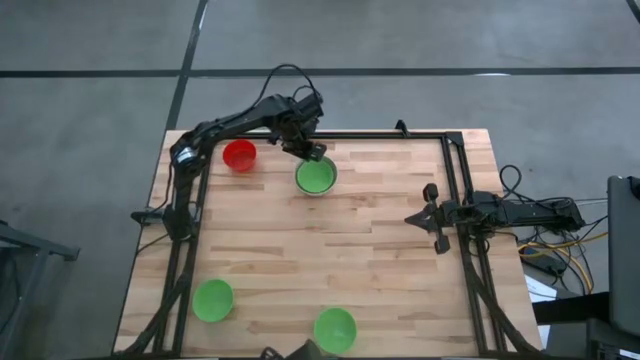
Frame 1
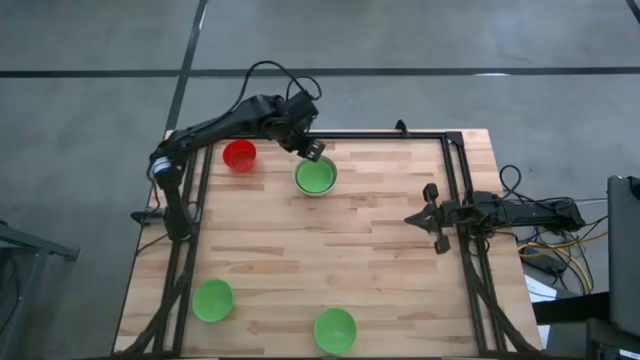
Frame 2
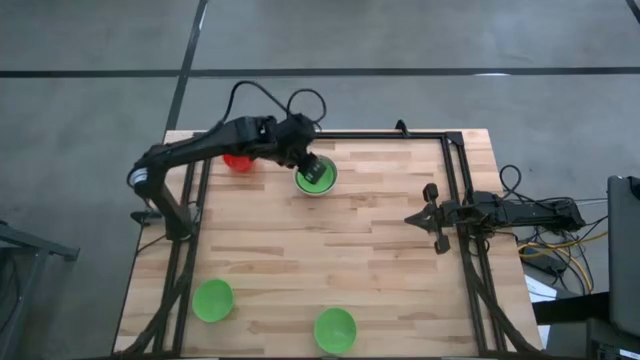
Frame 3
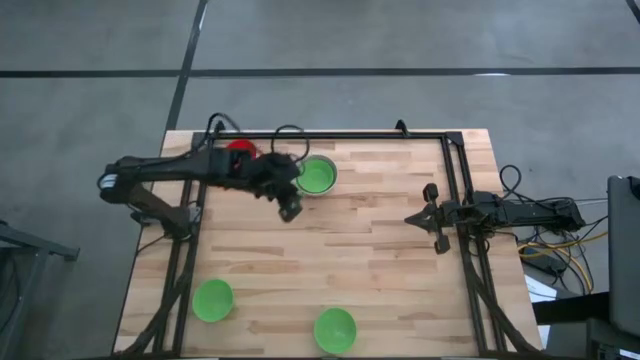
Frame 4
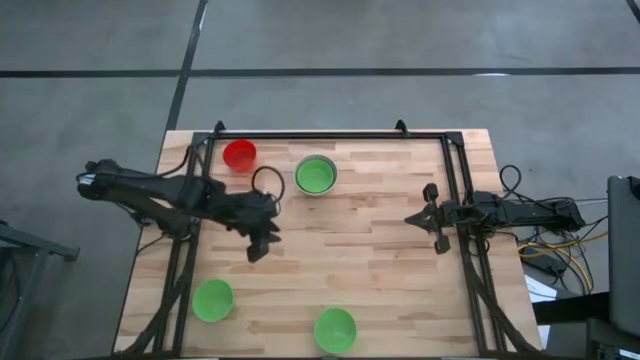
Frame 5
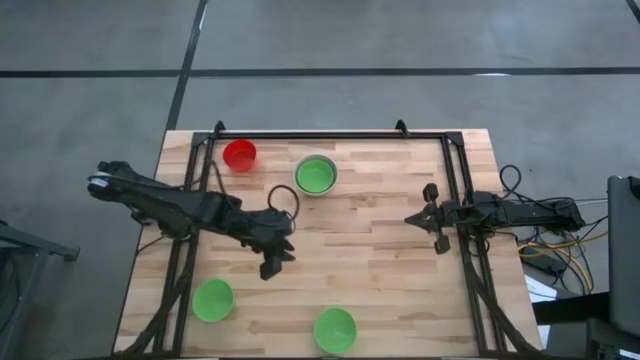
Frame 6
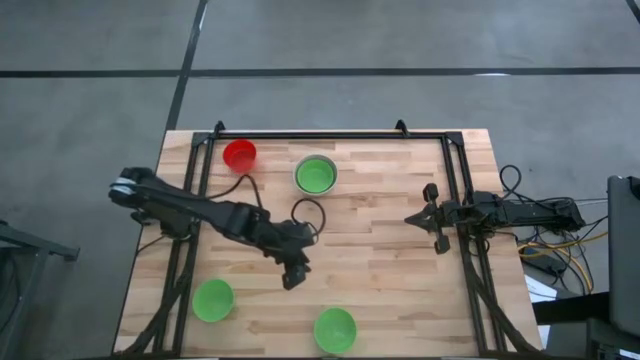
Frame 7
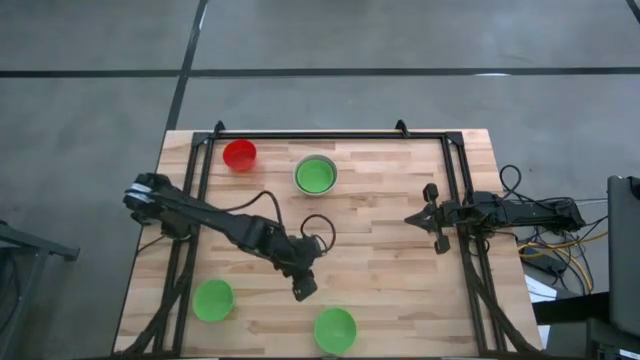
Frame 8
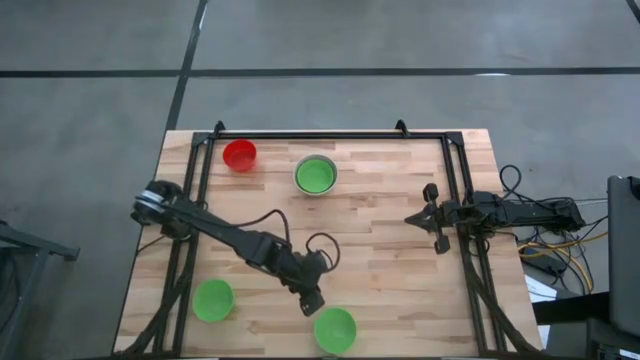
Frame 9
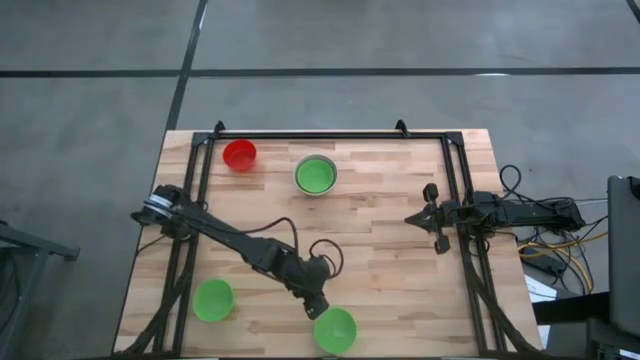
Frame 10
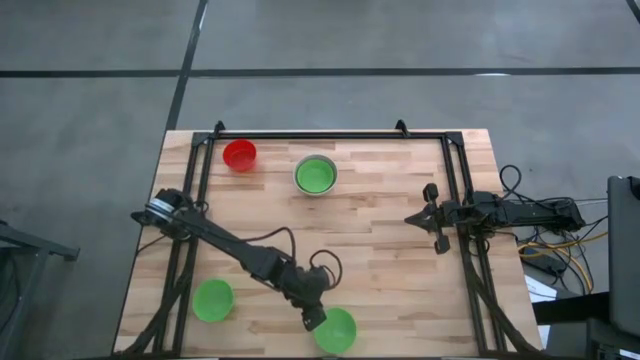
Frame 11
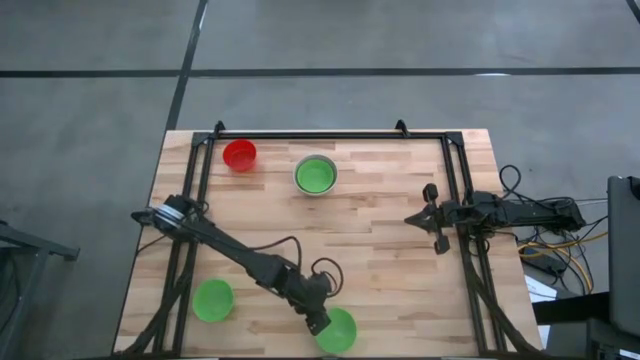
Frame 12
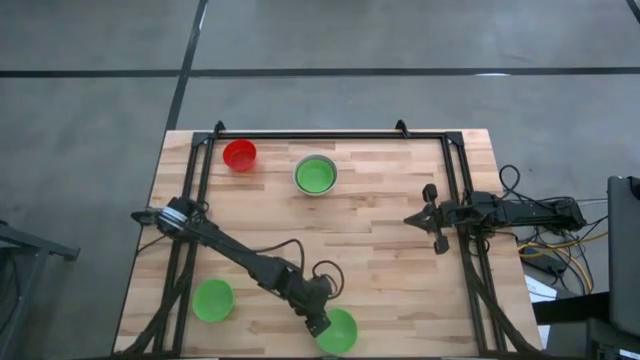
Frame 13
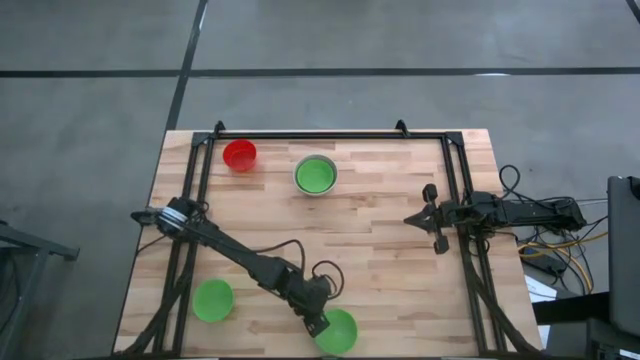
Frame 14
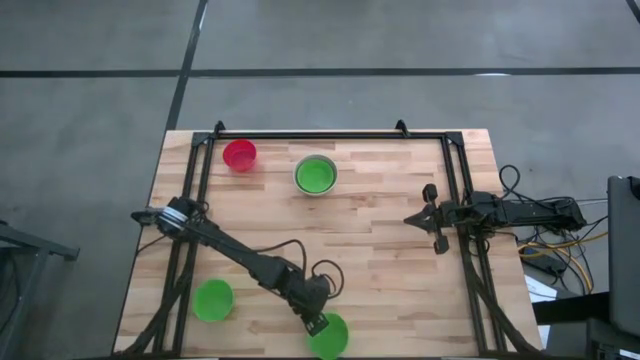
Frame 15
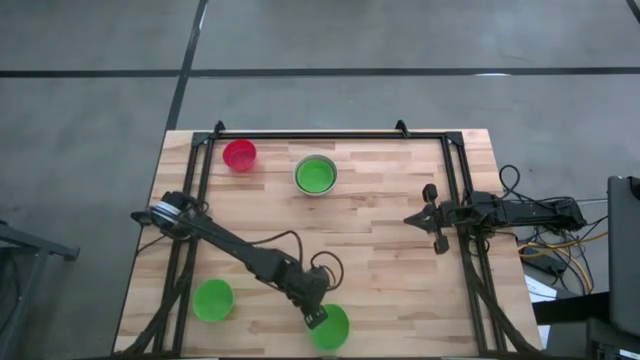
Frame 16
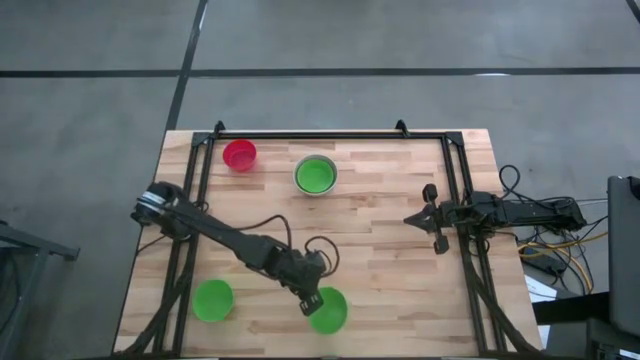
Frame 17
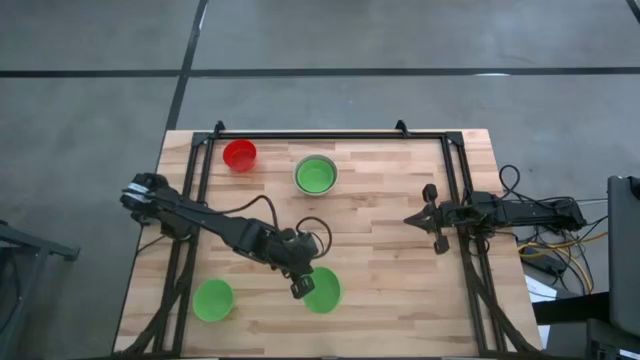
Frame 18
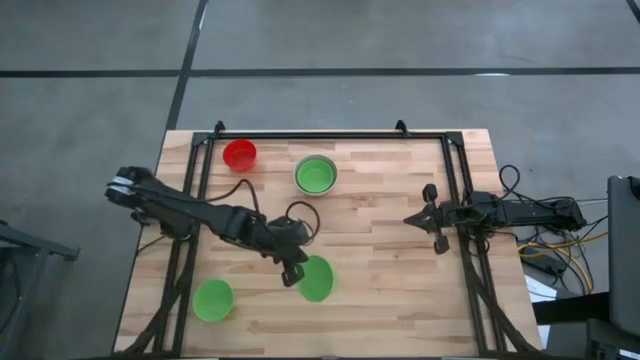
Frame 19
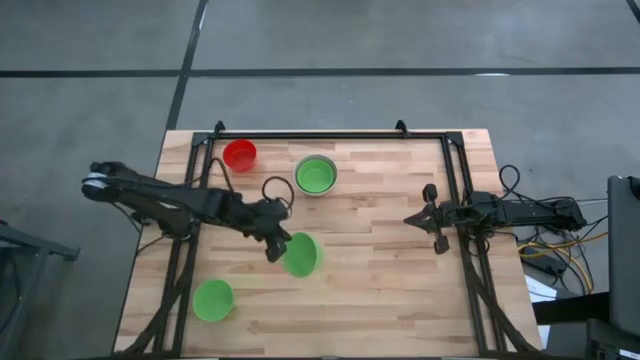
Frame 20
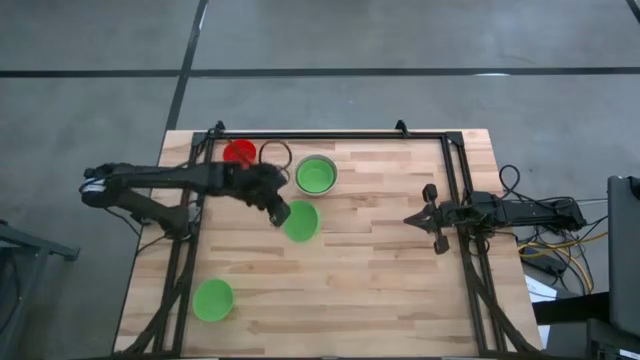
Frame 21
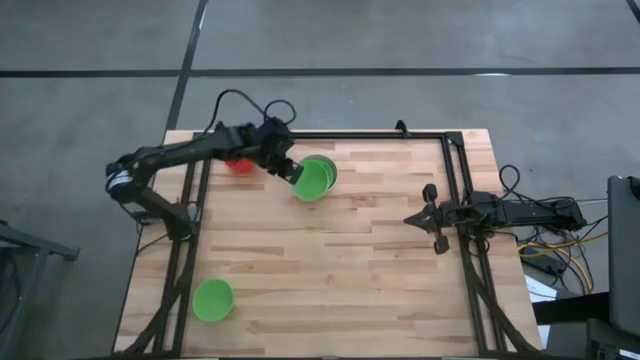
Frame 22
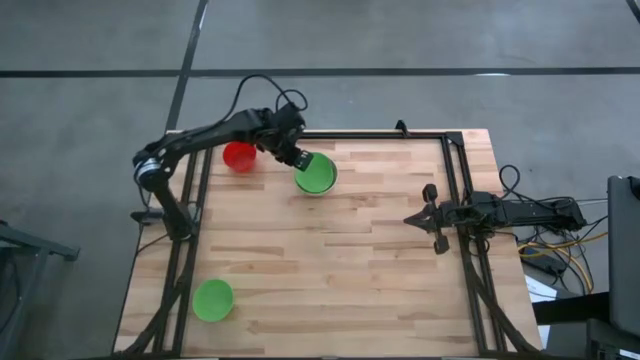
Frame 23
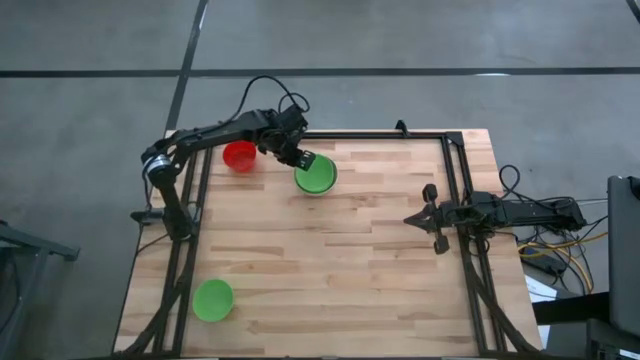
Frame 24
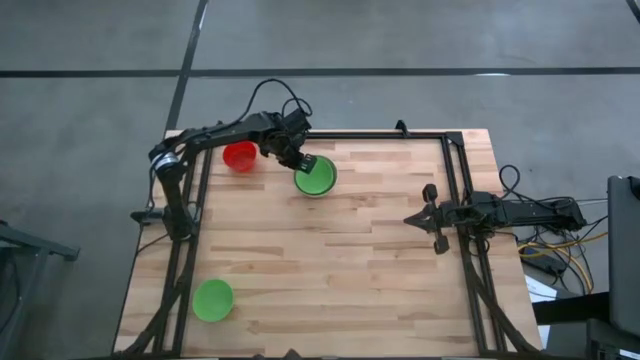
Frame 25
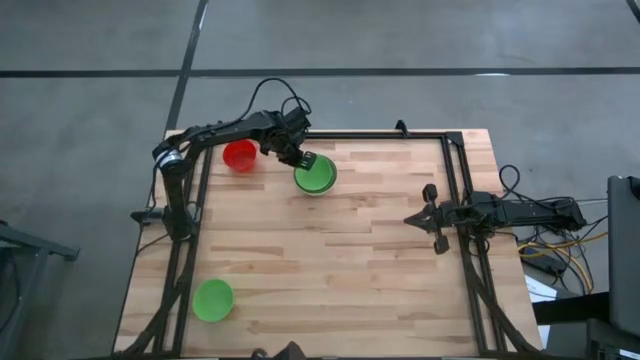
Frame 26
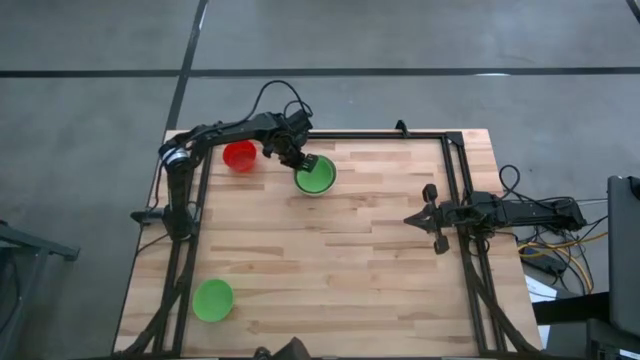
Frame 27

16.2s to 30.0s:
Stack the bottom left green bowl on the top green bowl

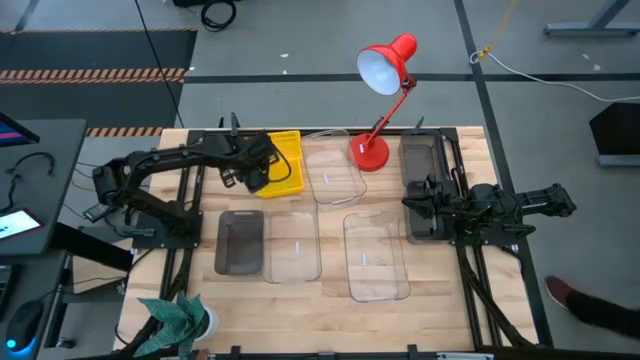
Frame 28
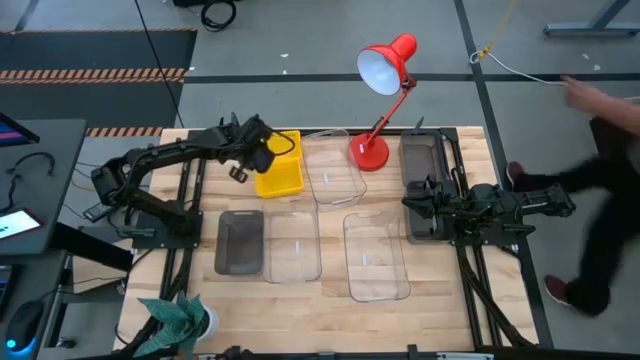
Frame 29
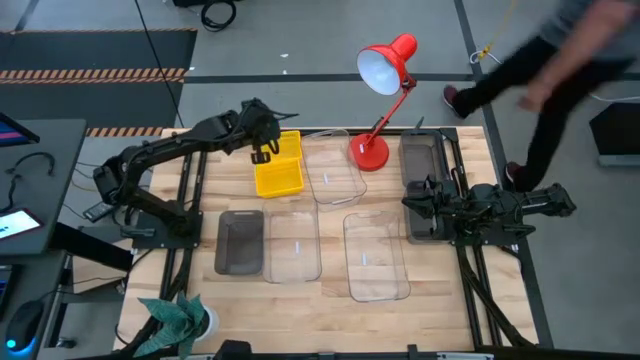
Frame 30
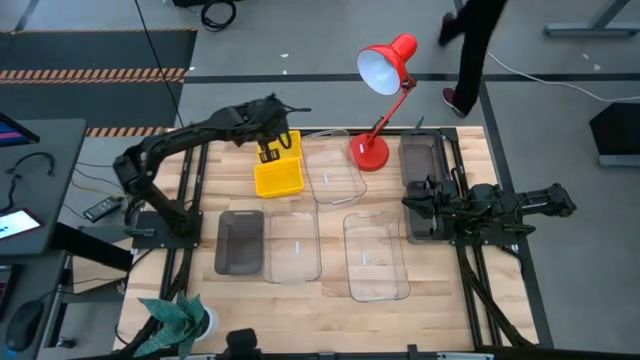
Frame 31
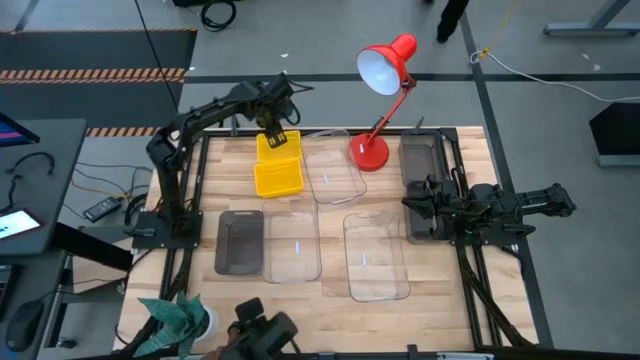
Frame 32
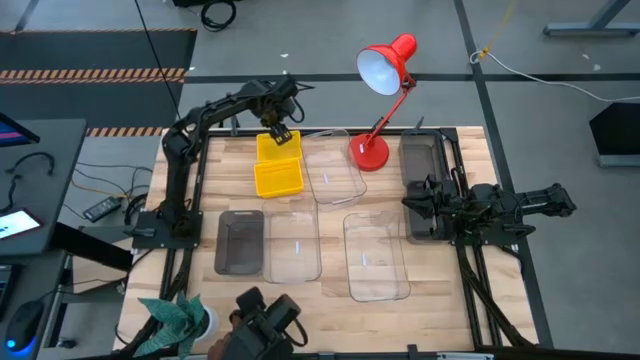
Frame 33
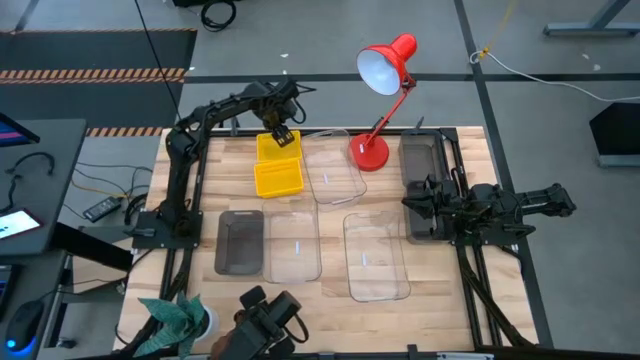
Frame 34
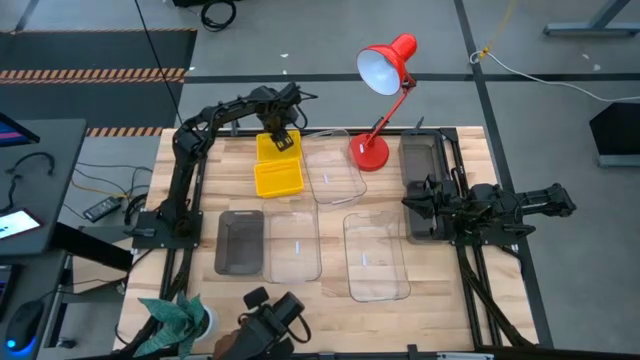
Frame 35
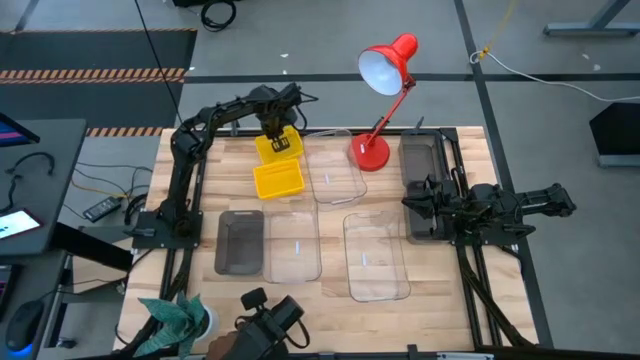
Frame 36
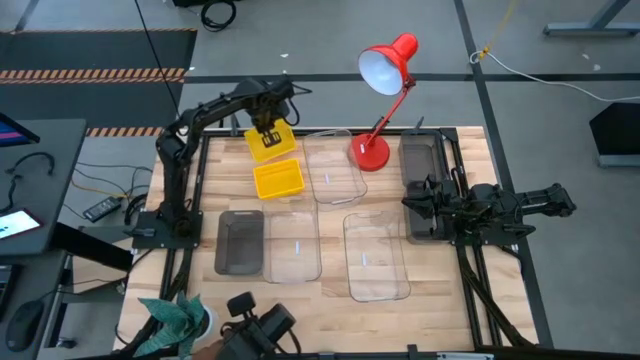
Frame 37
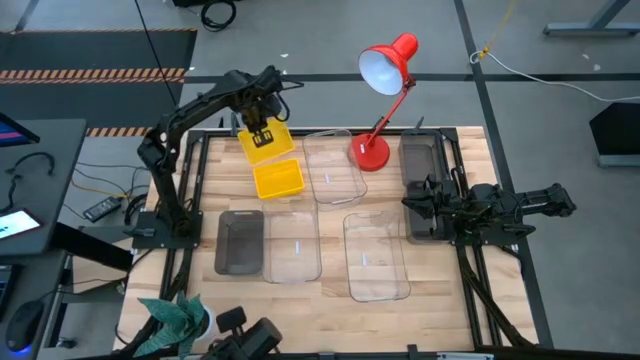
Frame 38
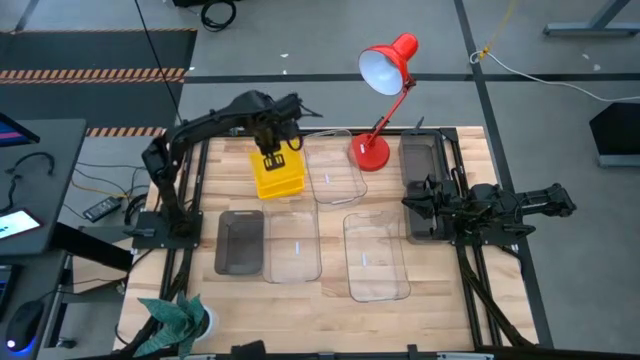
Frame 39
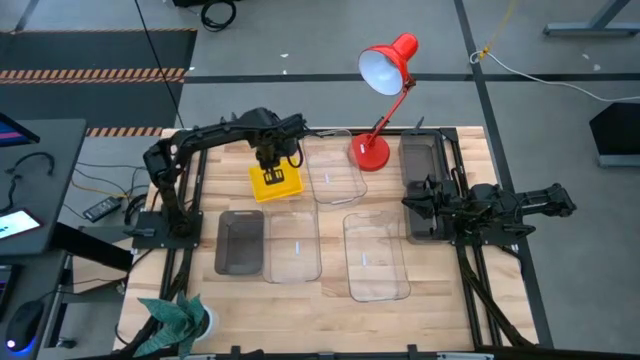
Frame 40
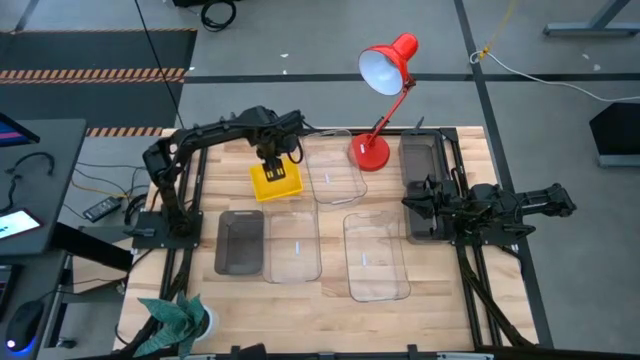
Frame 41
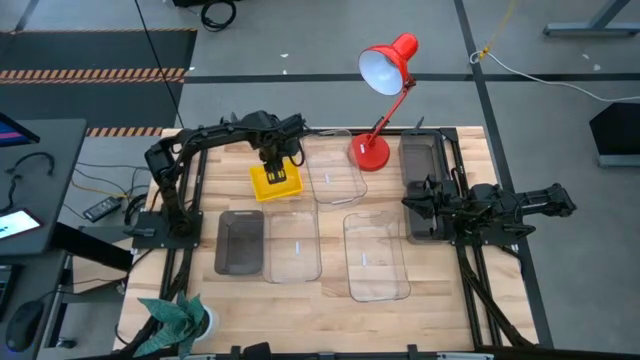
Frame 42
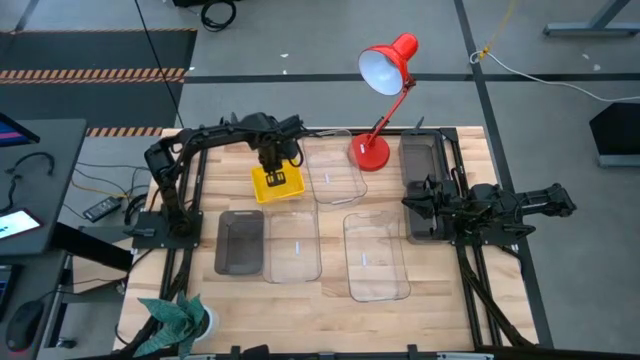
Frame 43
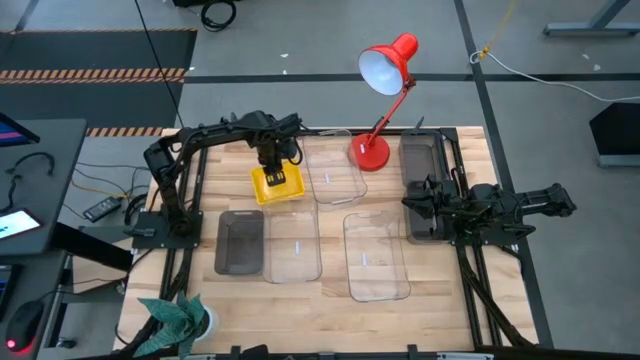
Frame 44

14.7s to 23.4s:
Stack the top yellow bin on the bottom yellow bin
